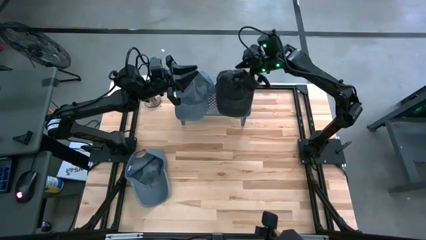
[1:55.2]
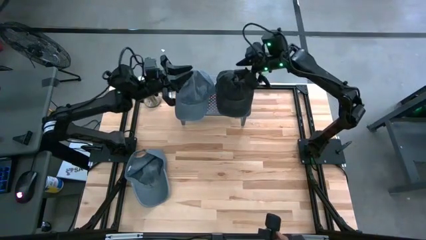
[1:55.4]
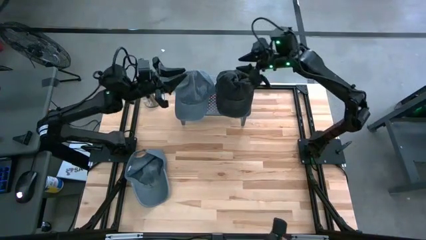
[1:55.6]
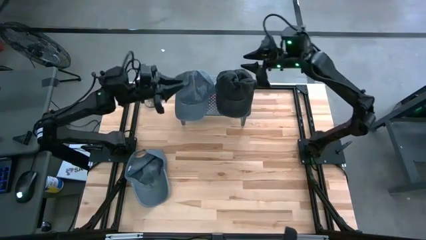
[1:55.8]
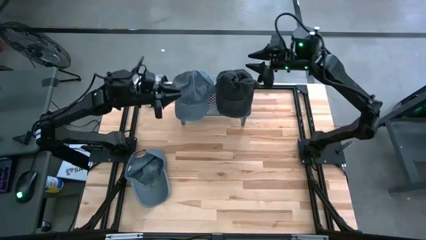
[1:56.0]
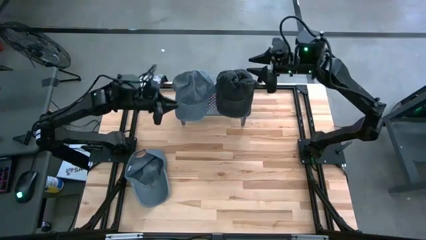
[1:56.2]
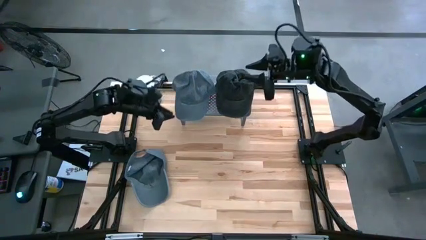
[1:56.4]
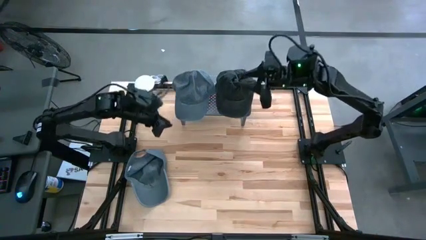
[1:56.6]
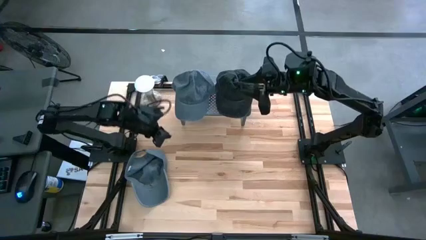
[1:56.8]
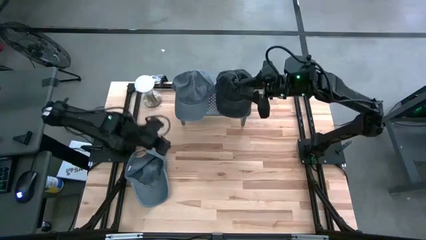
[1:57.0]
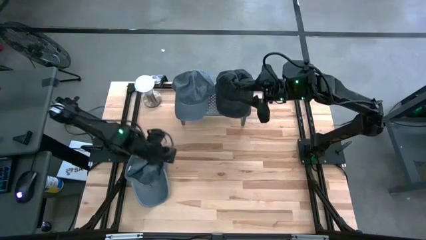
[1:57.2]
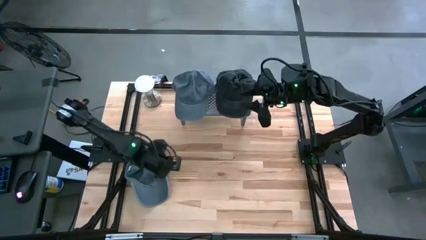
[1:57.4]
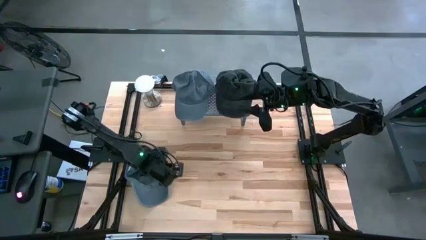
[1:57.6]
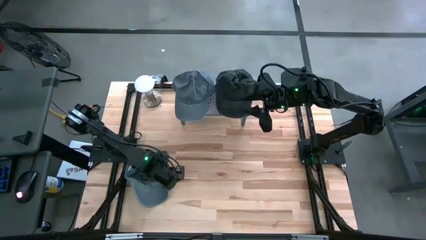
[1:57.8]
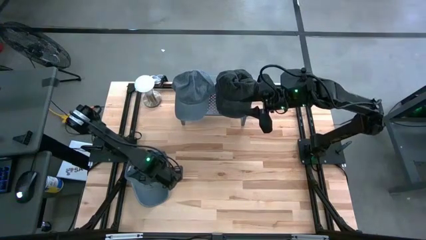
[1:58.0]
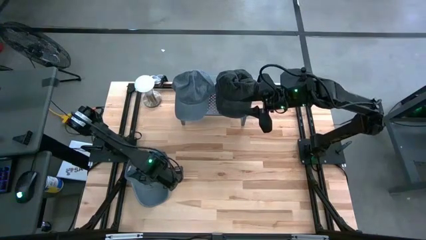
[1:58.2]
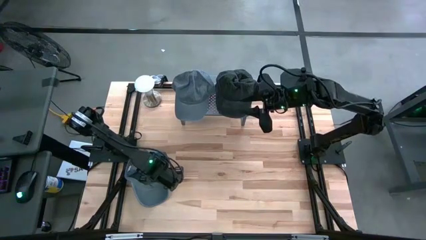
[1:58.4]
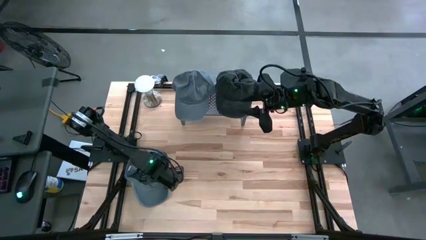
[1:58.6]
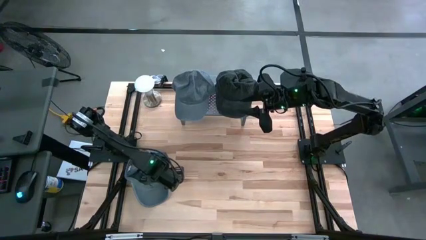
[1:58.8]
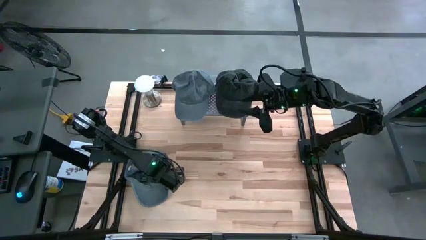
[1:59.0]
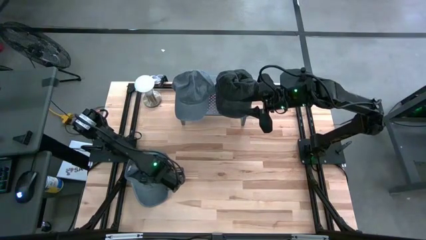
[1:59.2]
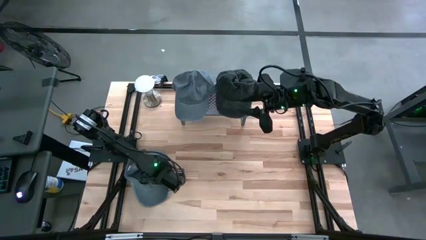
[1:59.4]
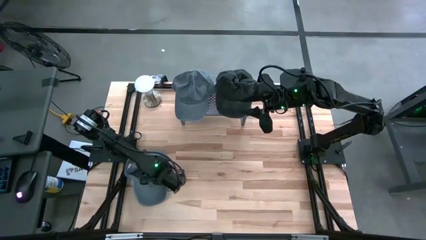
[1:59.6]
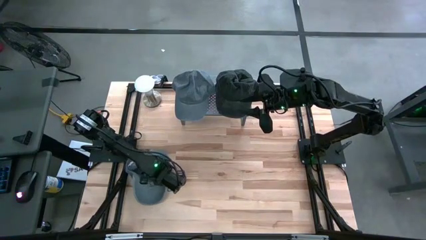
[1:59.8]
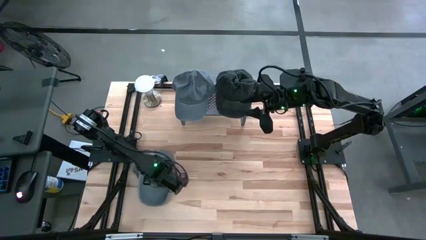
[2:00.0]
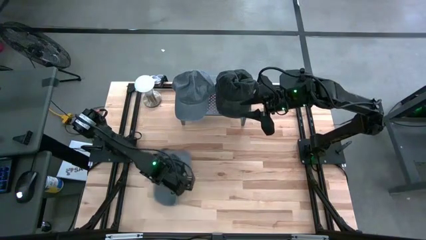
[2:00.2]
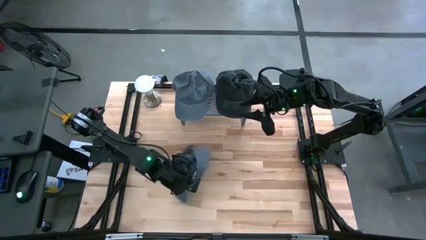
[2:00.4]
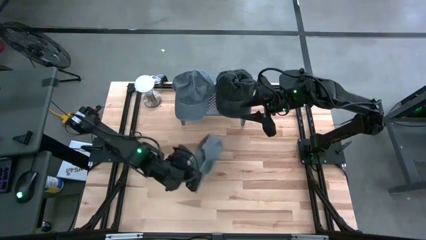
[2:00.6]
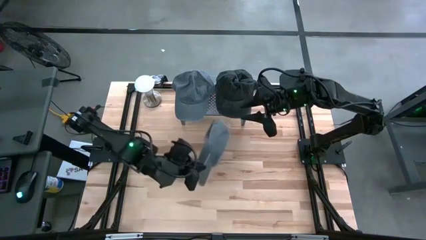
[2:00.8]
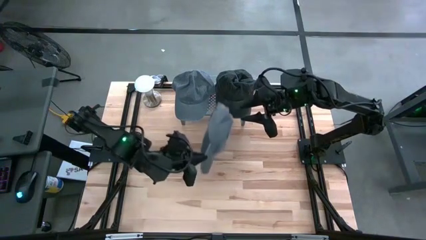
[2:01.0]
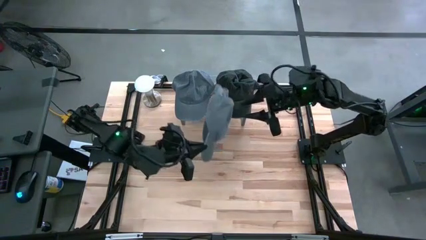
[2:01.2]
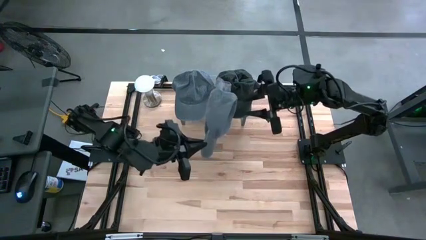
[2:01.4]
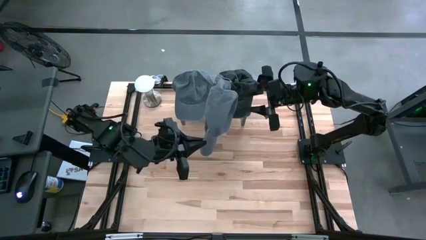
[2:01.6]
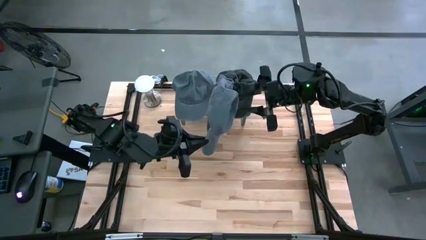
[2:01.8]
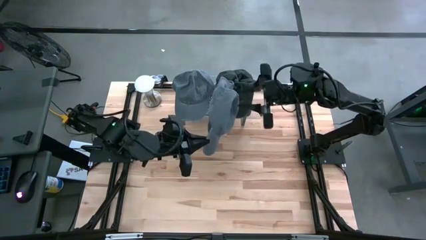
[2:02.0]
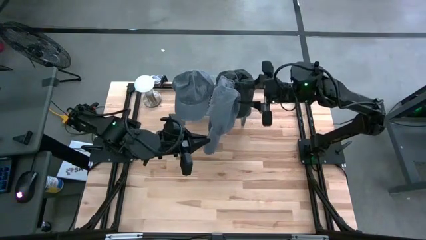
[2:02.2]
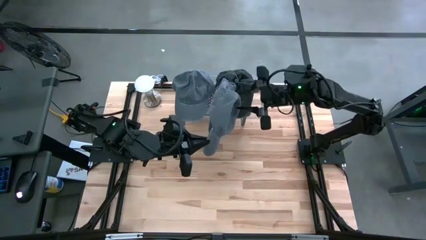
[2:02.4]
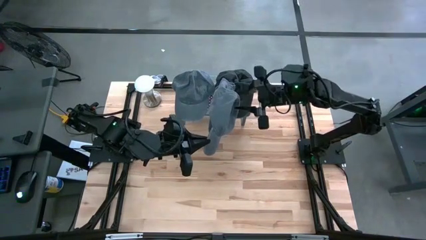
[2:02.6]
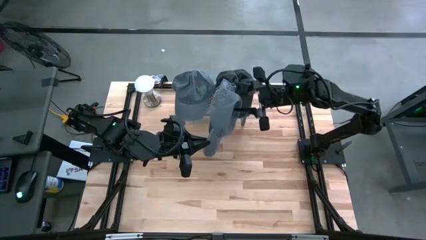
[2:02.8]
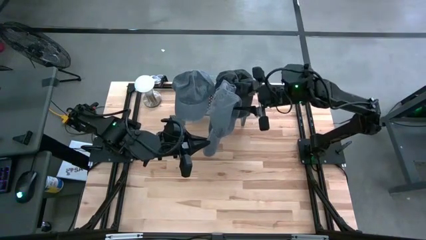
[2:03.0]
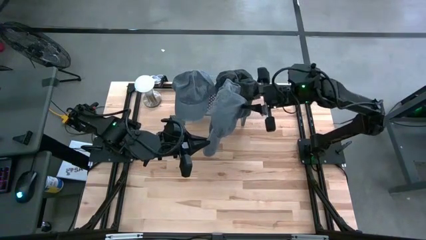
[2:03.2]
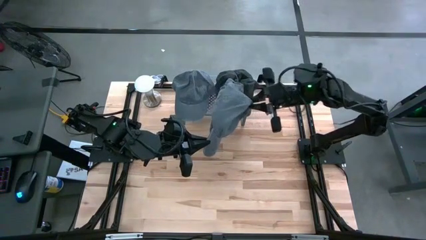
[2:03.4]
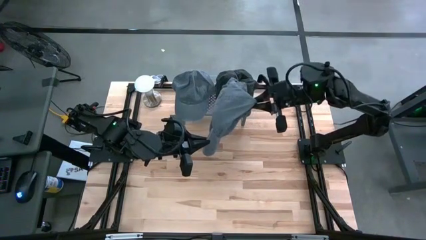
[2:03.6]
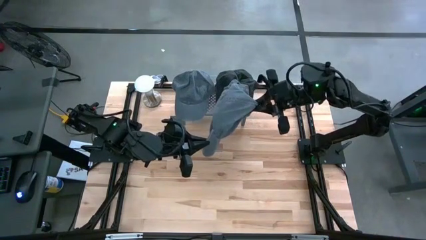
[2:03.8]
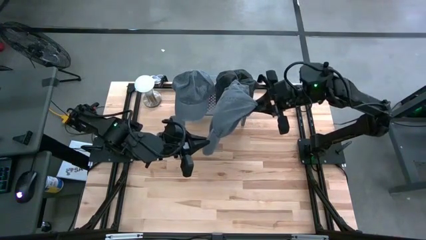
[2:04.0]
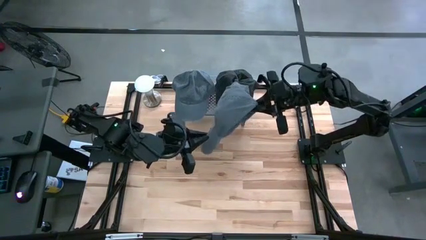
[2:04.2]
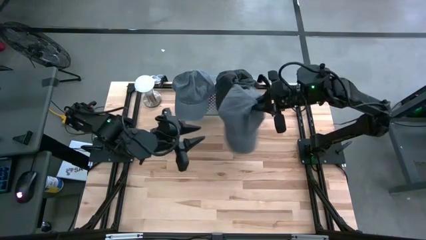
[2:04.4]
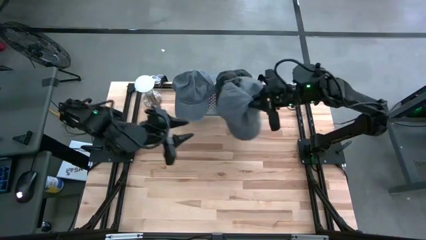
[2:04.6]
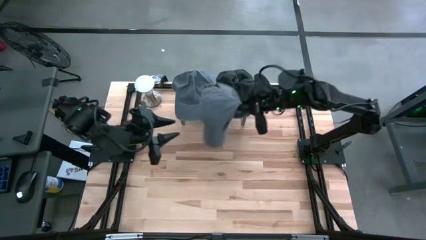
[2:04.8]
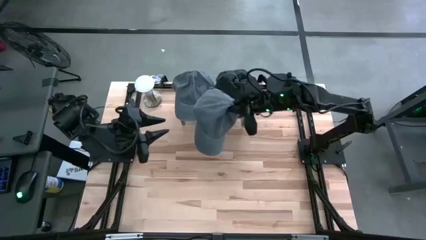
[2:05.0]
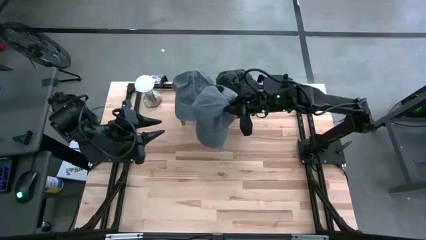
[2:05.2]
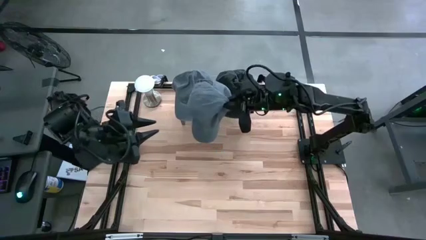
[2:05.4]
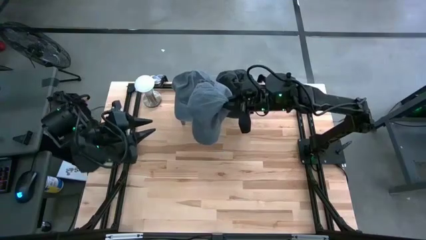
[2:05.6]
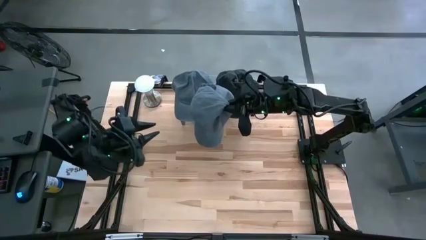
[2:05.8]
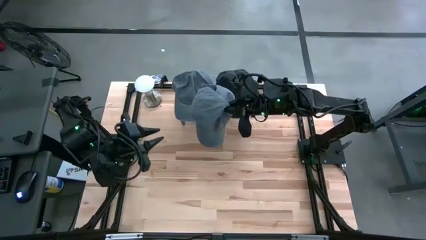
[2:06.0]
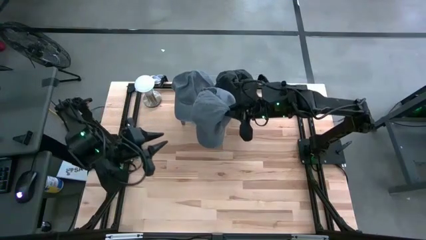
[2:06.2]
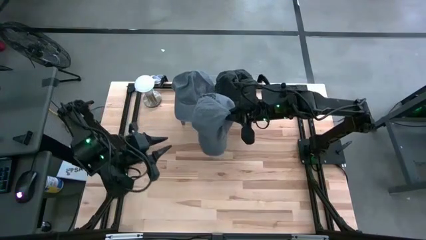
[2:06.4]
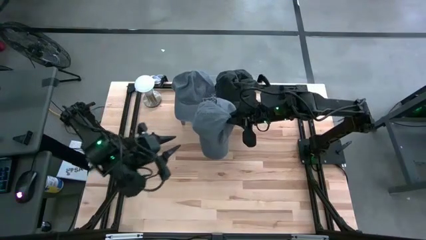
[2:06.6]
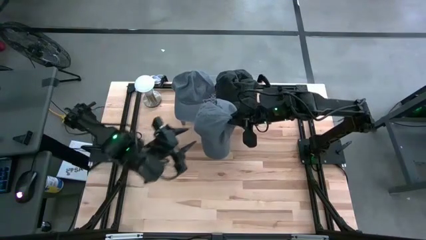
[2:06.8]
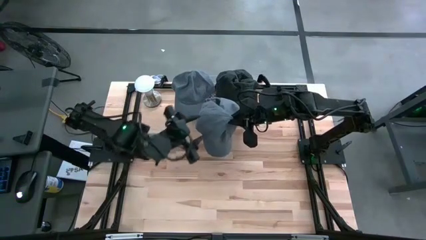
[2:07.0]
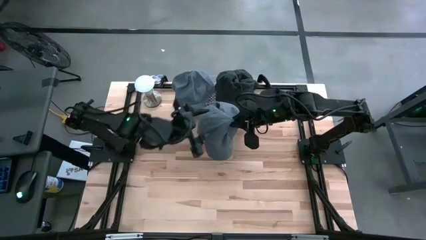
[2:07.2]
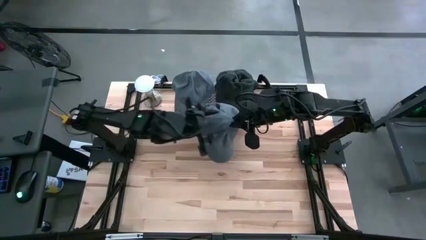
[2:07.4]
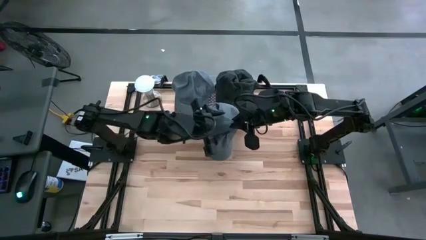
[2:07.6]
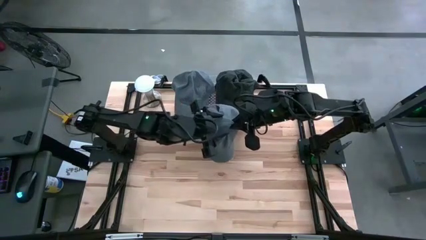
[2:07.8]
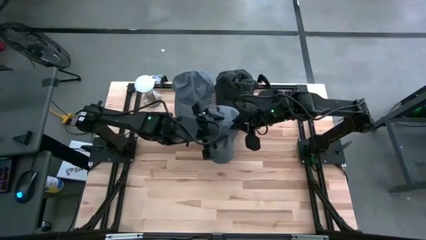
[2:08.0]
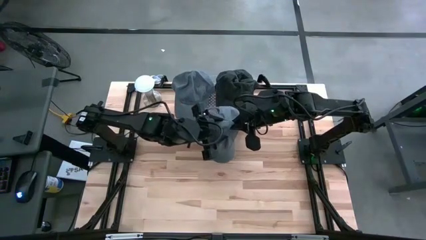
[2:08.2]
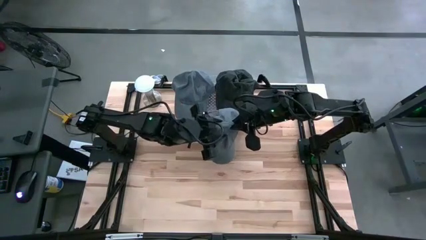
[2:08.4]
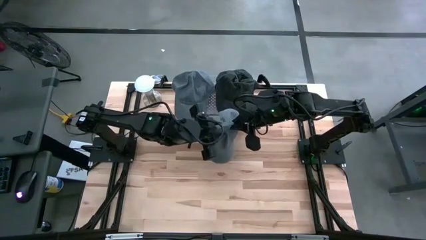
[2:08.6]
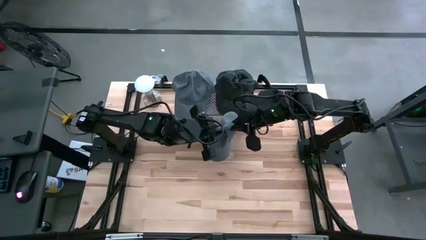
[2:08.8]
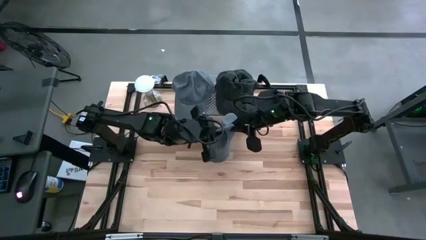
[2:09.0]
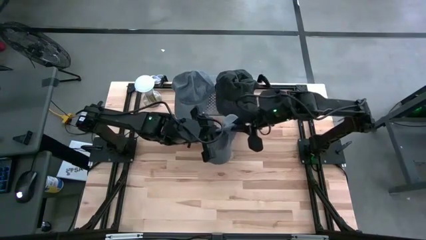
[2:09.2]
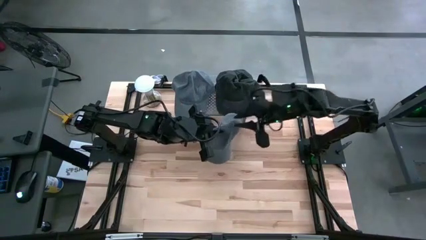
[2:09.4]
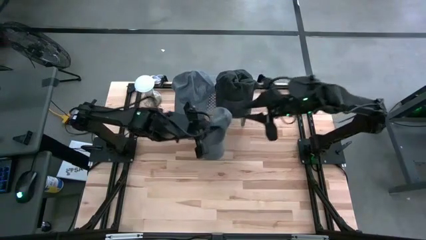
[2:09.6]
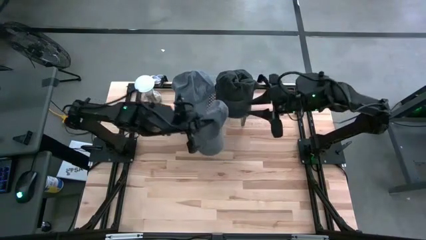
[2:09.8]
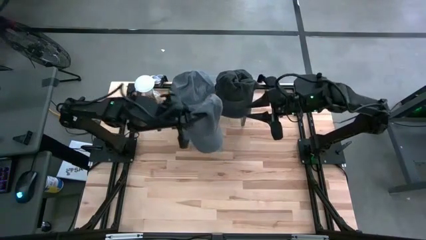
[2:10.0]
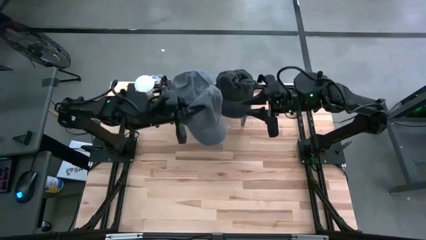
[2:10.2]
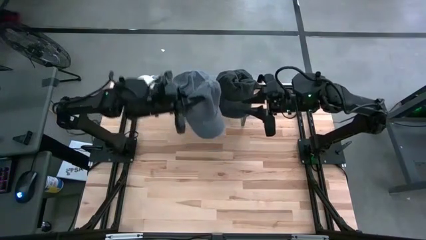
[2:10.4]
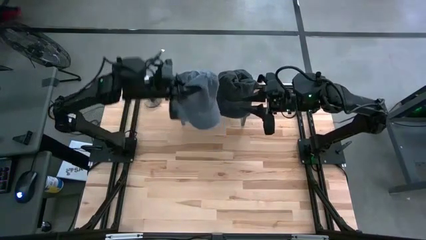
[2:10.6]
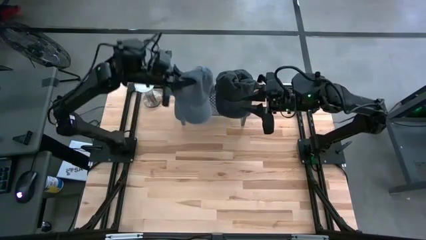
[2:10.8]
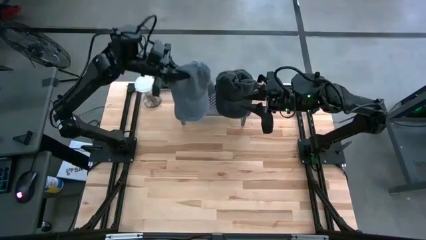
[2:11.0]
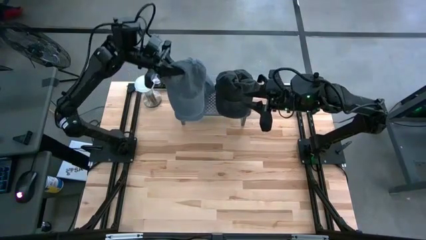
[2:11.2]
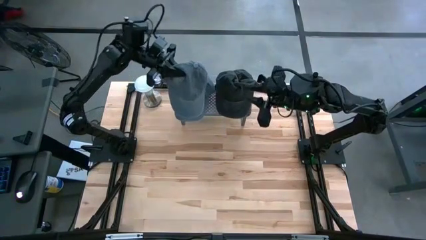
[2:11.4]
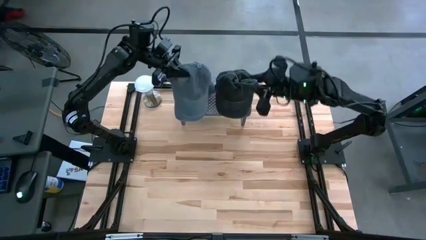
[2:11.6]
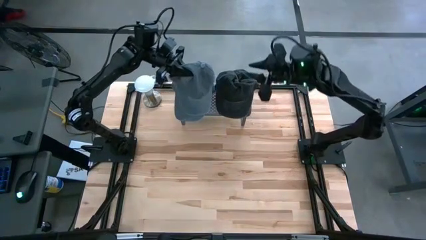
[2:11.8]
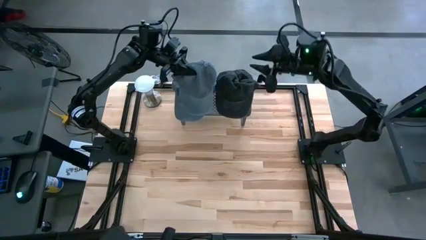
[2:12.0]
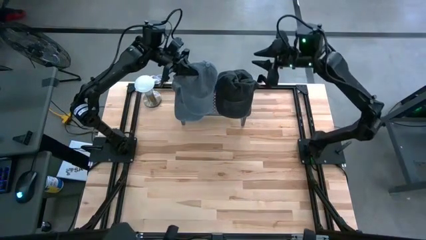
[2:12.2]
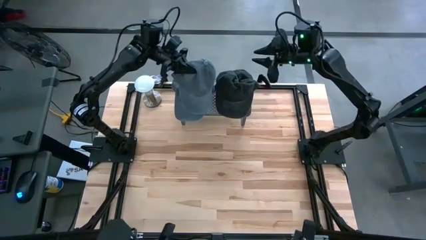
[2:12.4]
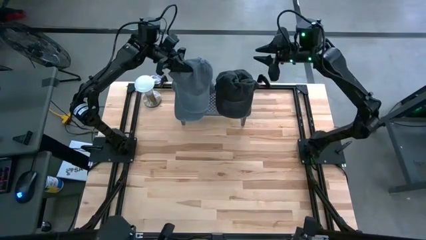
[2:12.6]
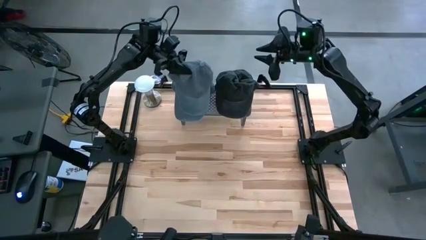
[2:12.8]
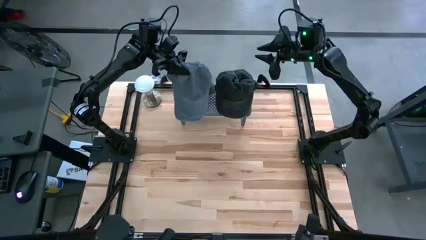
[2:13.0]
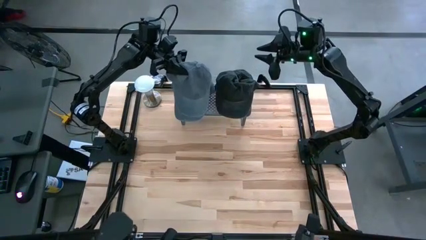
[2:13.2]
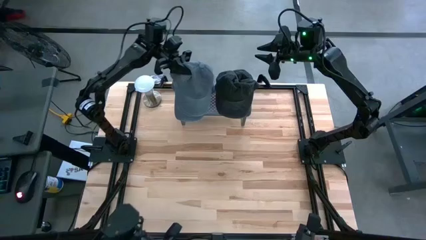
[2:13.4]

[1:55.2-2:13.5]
Task: Pick & Place hat
Stack the gray cap on top of the other gray cap on the shelf
